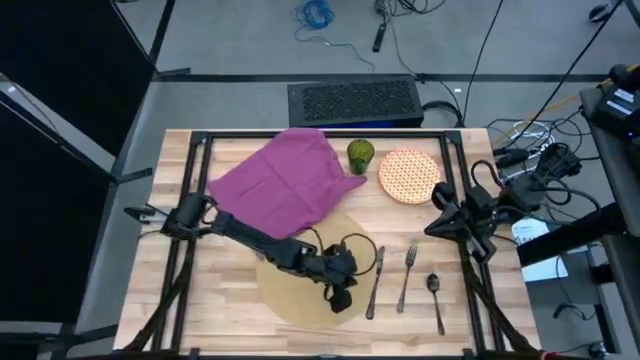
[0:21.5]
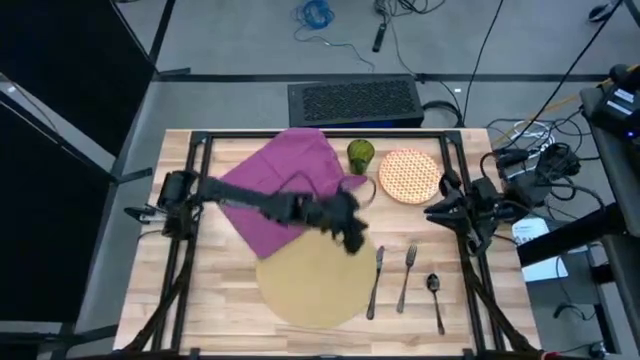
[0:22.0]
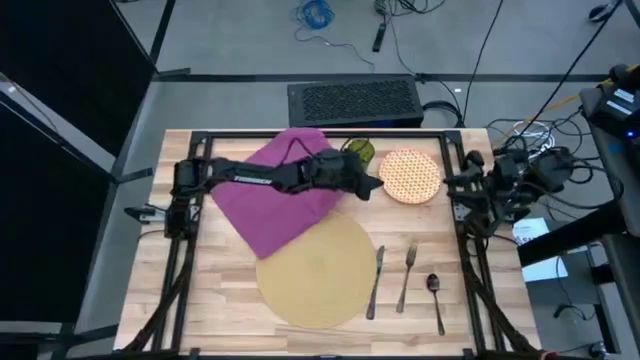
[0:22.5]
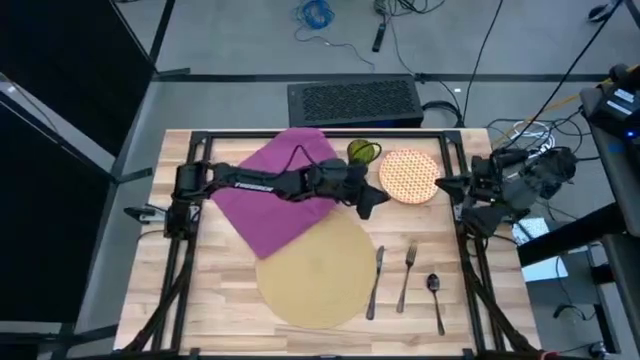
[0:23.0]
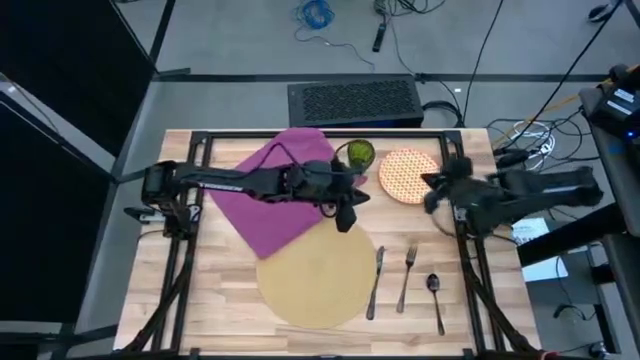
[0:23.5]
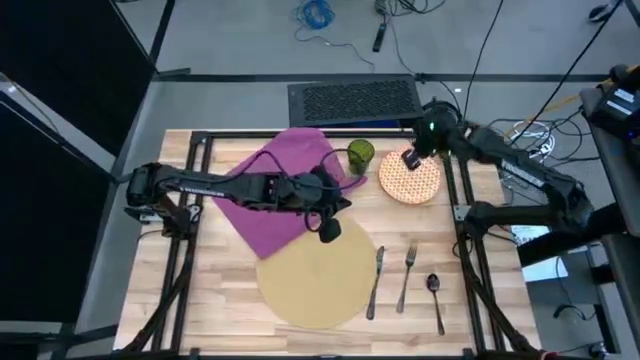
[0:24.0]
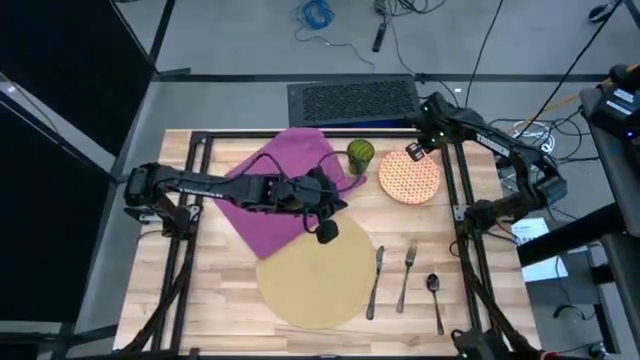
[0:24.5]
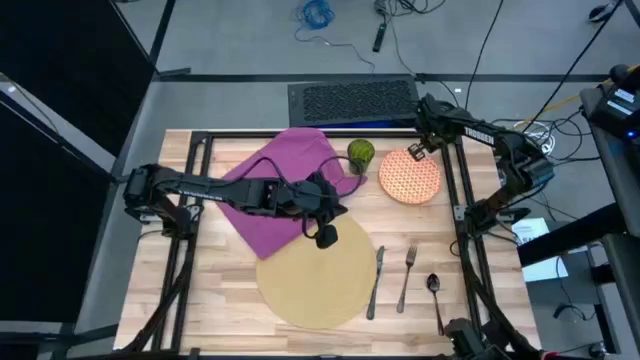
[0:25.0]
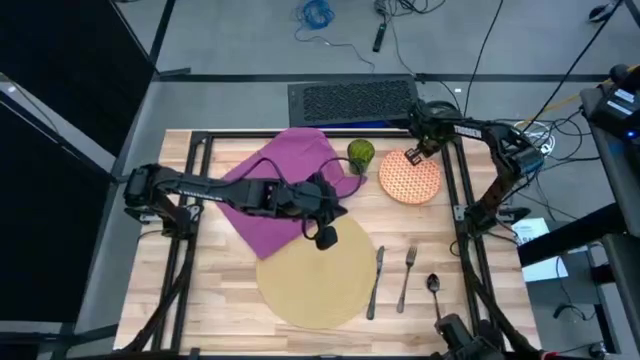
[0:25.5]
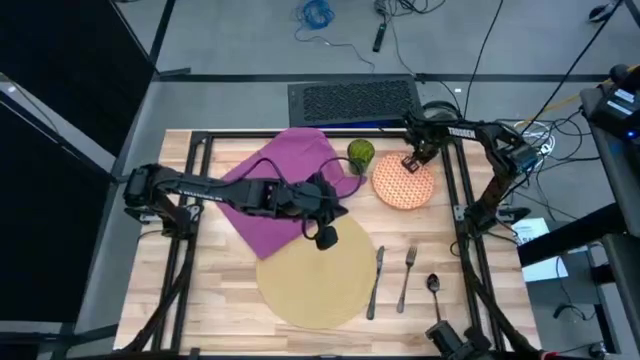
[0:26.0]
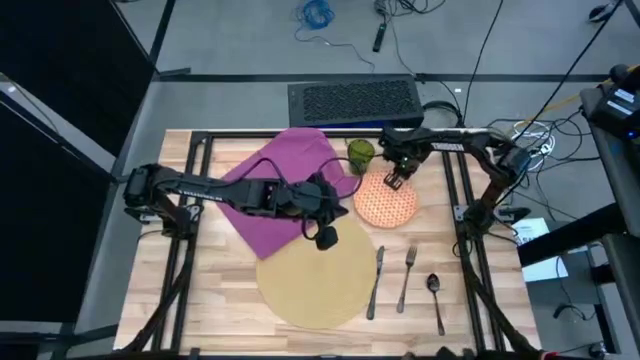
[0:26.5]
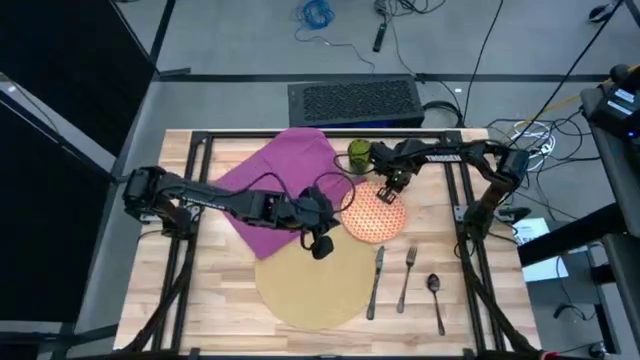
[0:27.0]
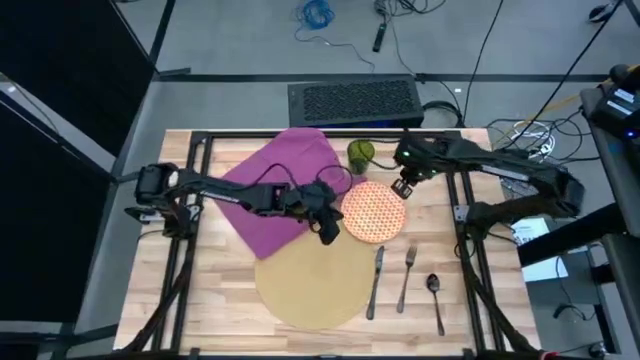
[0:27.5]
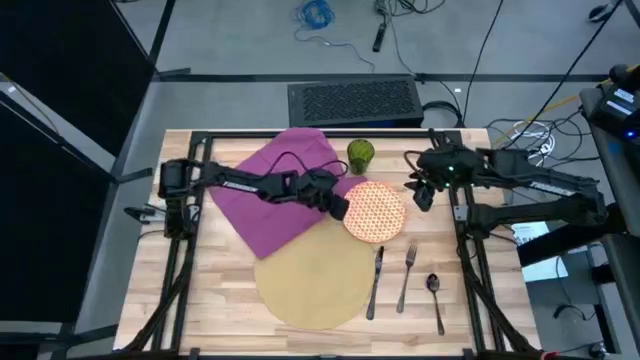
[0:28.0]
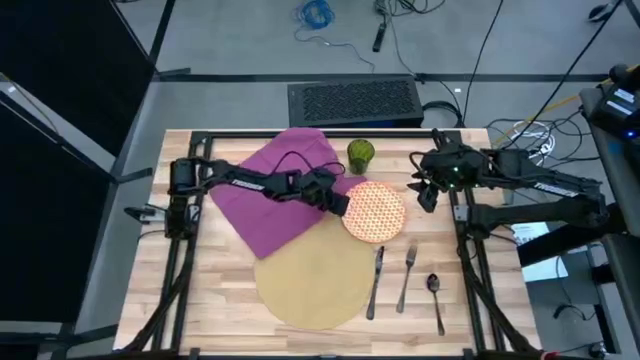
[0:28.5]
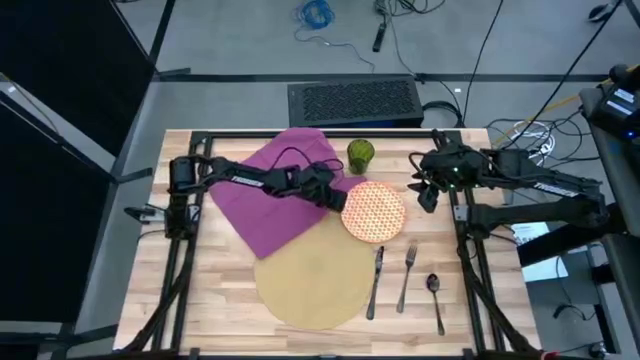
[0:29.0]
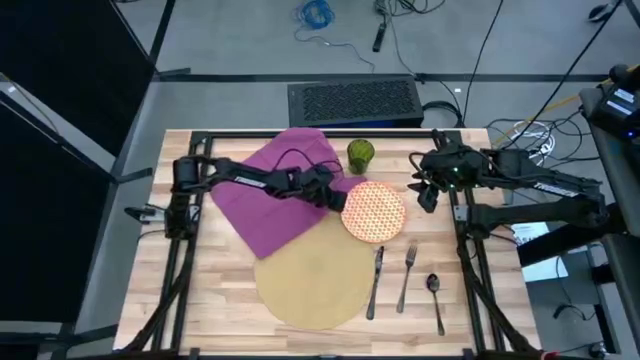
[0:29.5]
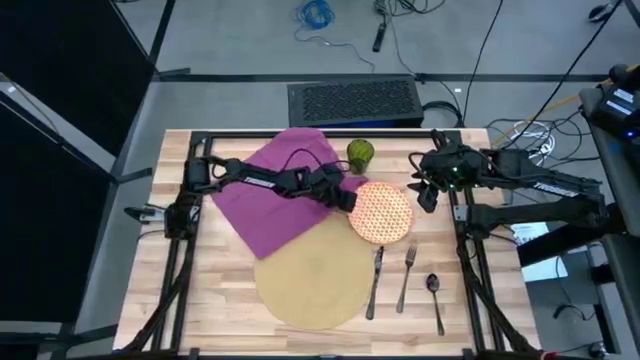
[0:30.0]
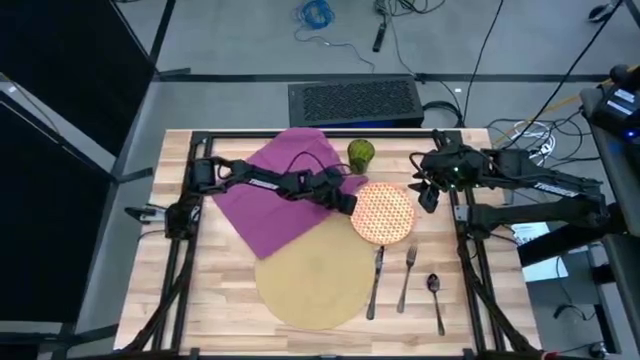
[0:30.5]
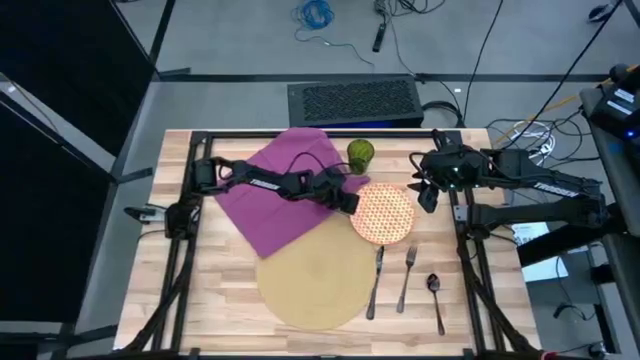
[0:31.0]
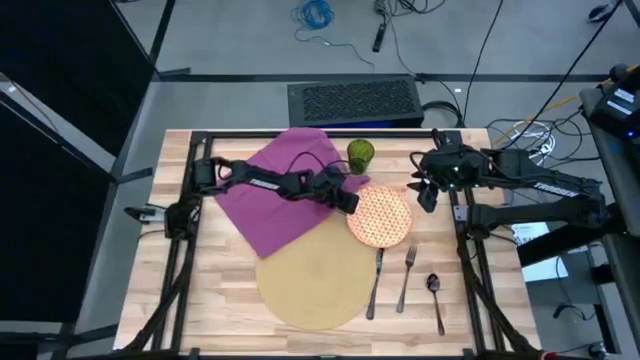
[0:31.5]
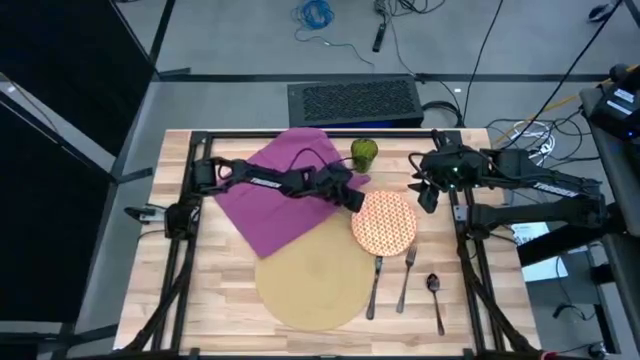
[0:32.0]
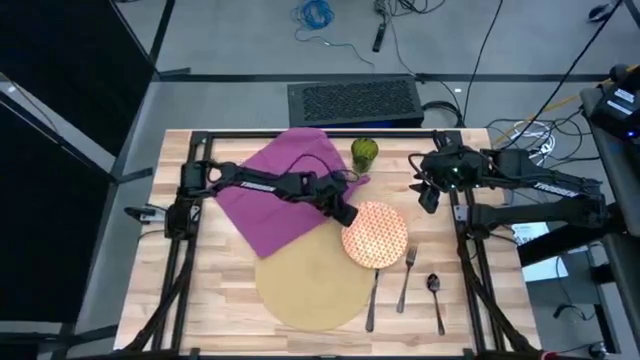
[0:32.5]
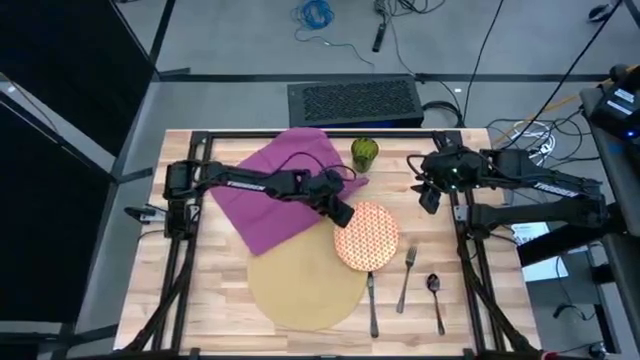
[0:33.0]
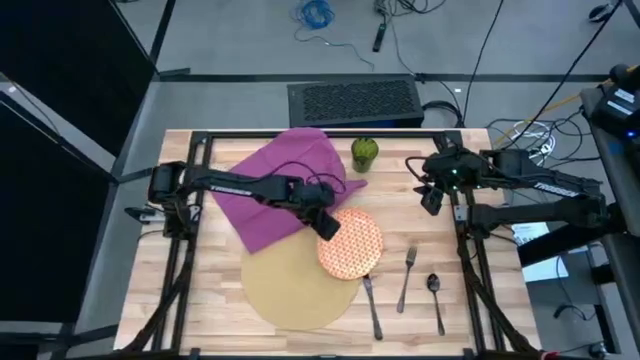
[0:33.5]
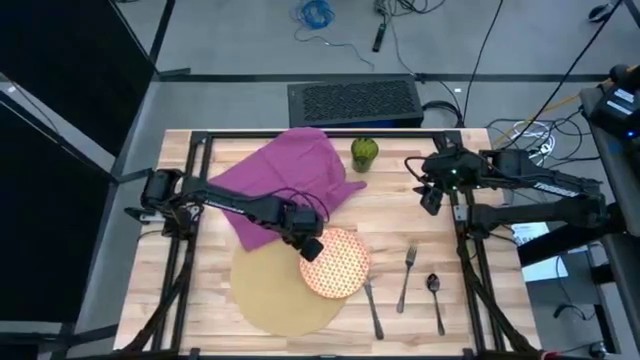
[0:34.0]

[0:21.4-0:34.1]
Task: Set table place
Put the orange plate on the brown placemat

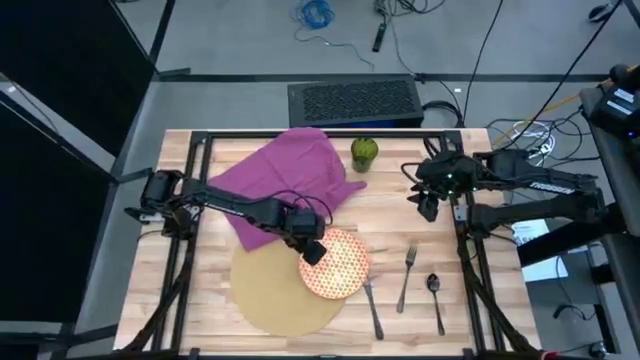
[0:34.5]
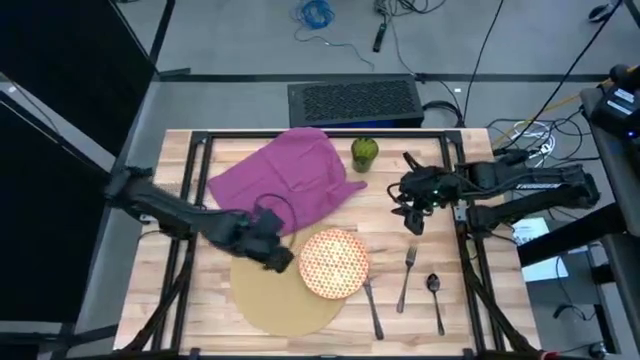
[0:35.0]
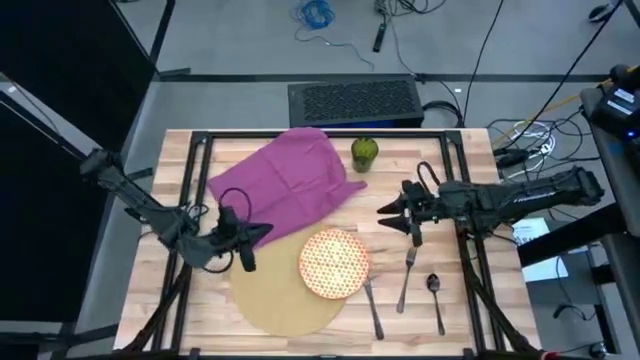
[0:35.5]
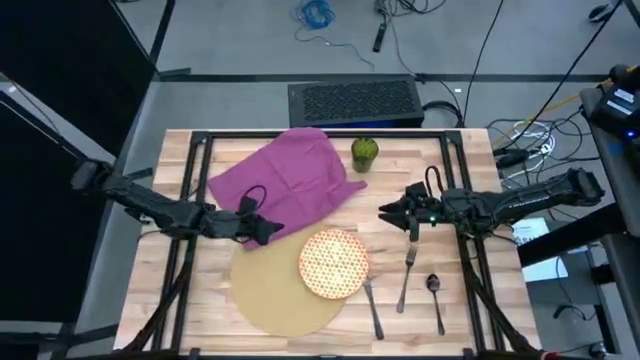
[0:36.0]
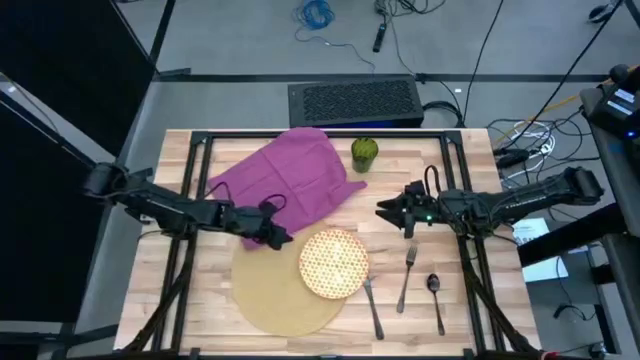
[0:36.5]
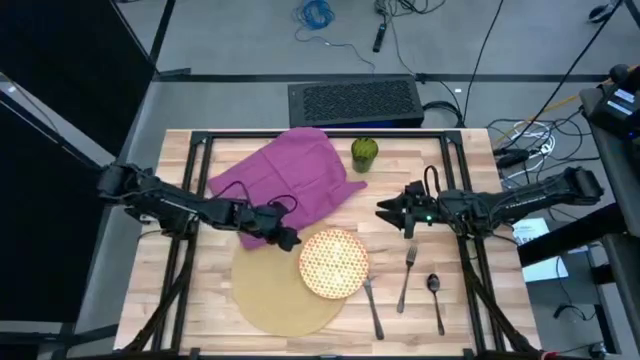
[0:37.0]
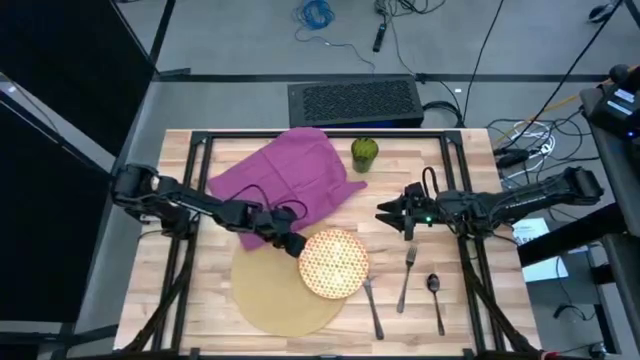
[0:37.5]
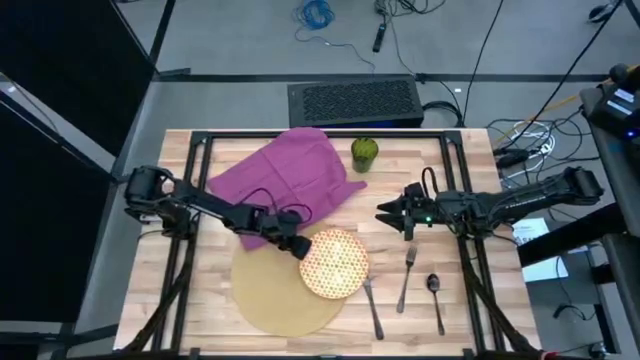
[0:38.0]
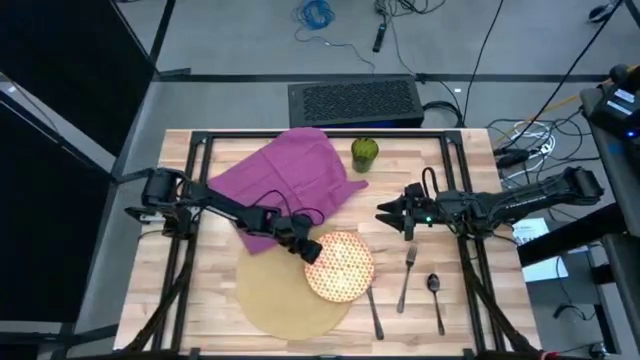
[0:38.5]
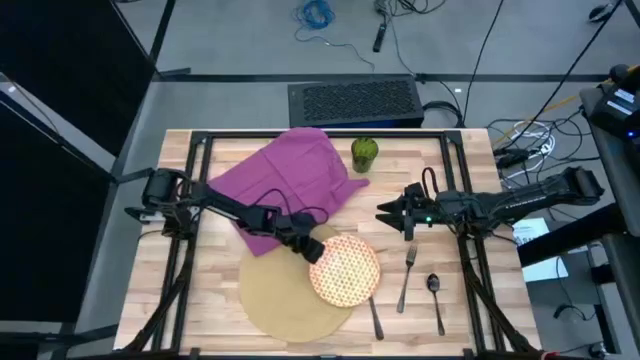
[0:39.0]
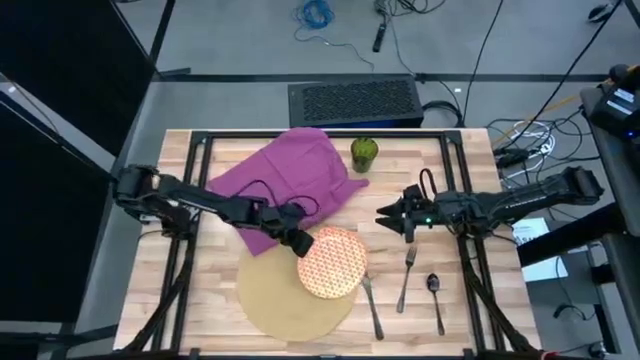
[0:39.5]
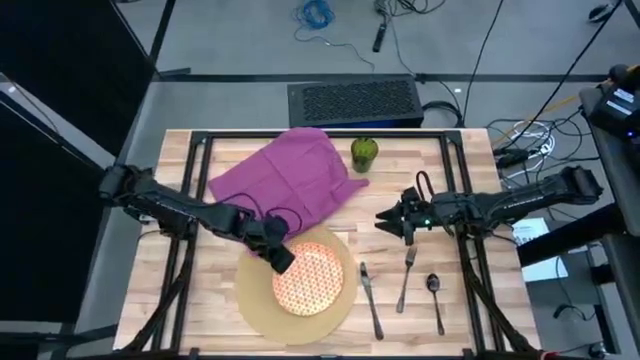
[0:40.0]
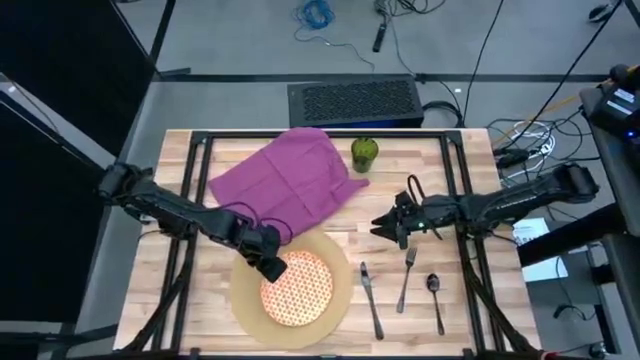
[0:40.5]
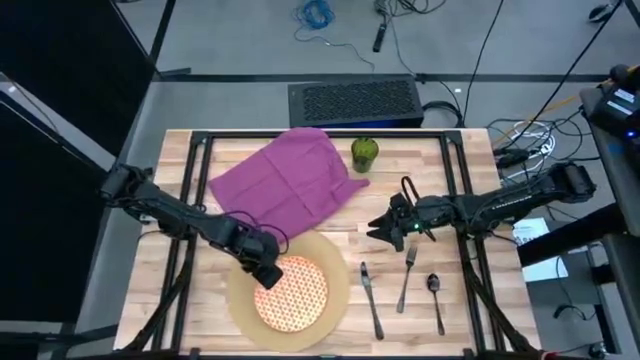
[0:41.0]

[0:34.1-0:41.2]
Put the orange plate on the brown placemat

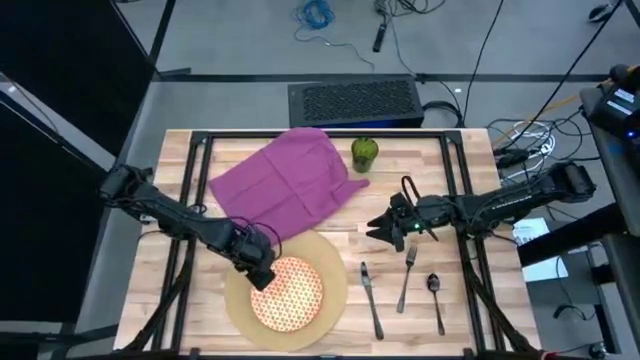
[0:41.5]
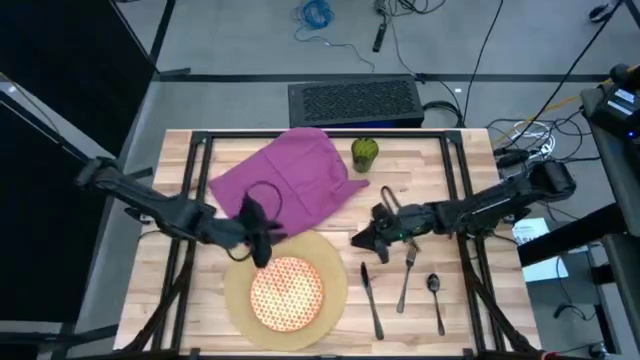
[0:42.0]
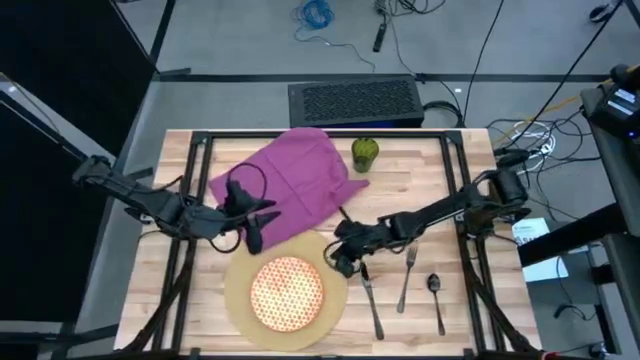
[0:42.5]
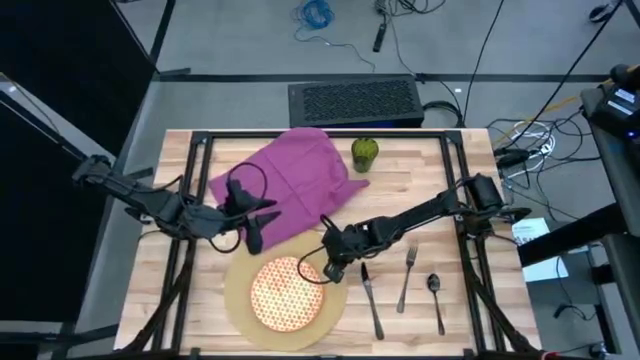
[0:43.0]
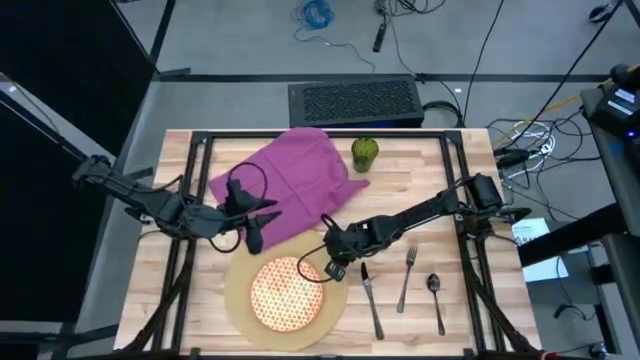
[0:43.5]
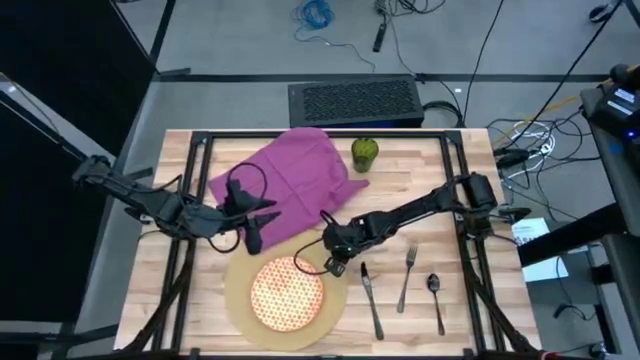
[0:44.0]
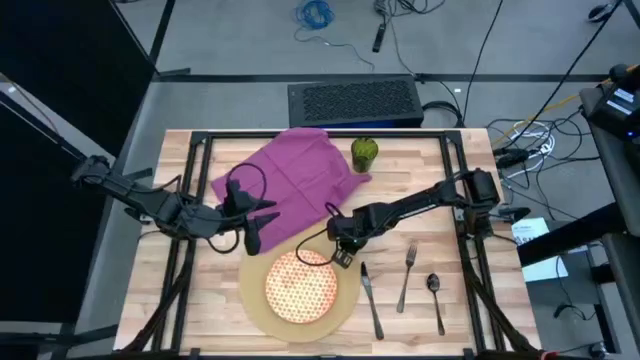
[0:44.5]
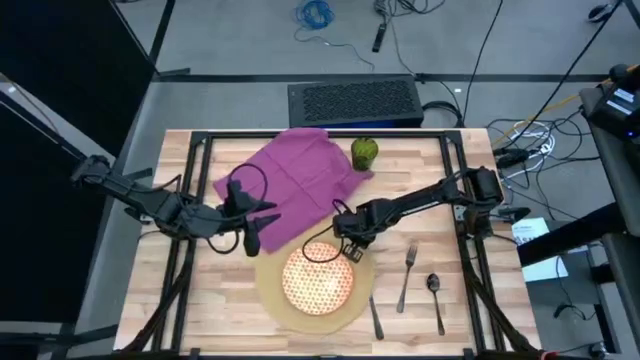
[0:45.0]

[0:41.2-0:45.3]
Adjust the brown placemat
